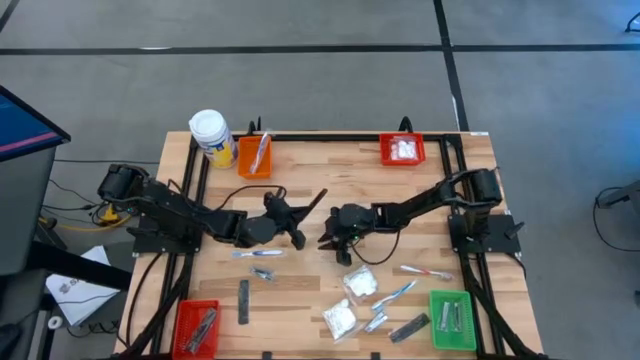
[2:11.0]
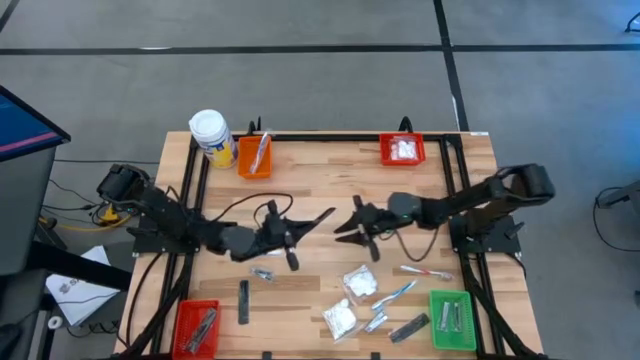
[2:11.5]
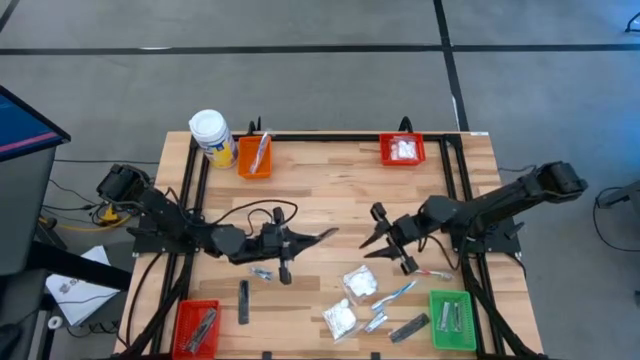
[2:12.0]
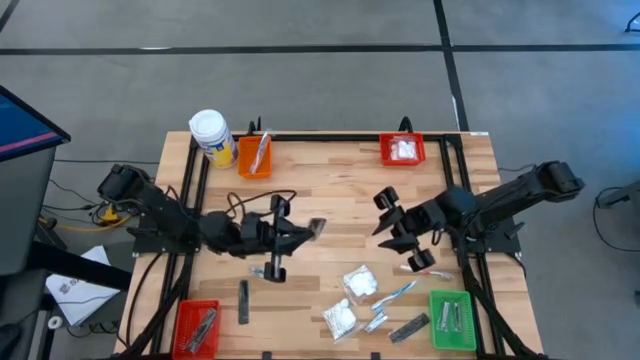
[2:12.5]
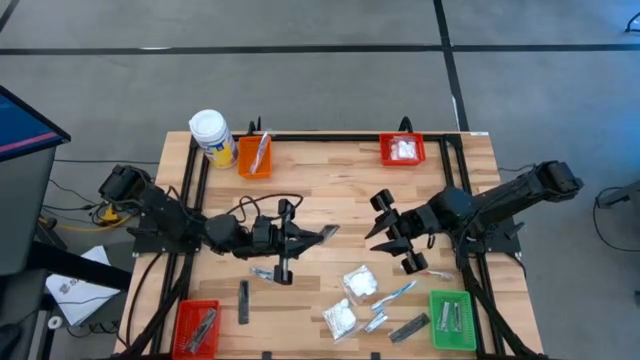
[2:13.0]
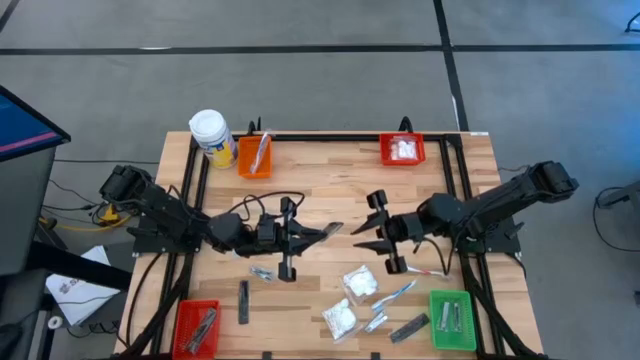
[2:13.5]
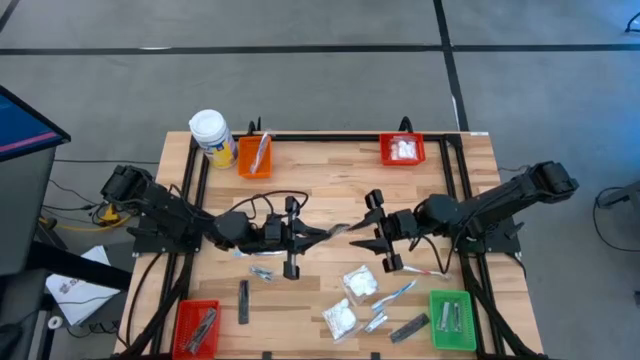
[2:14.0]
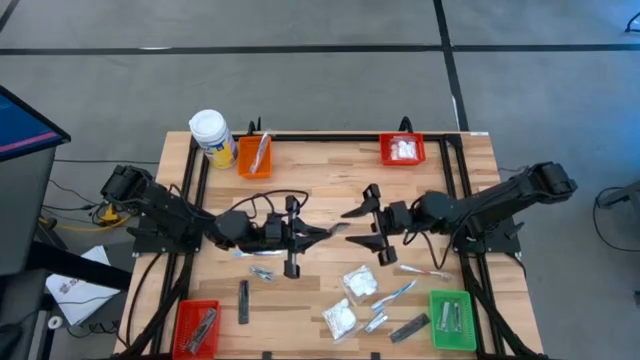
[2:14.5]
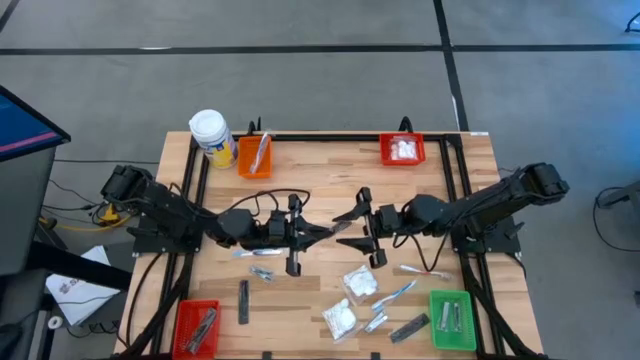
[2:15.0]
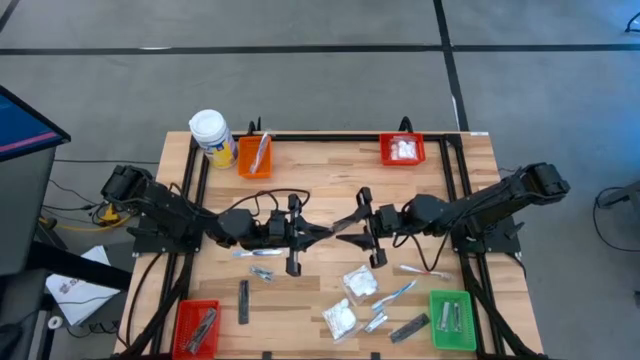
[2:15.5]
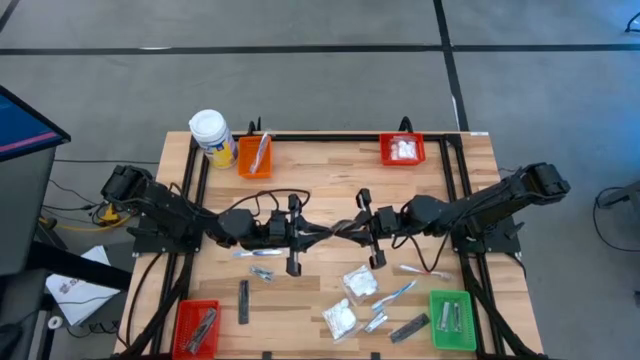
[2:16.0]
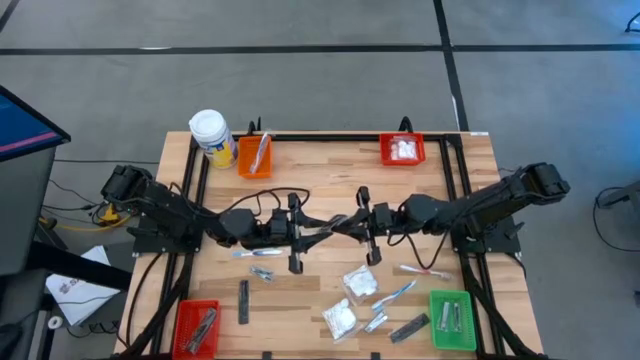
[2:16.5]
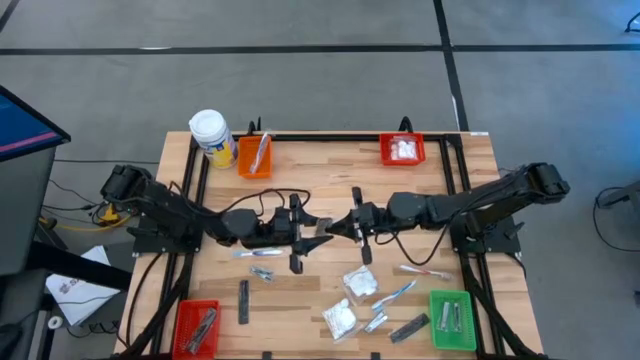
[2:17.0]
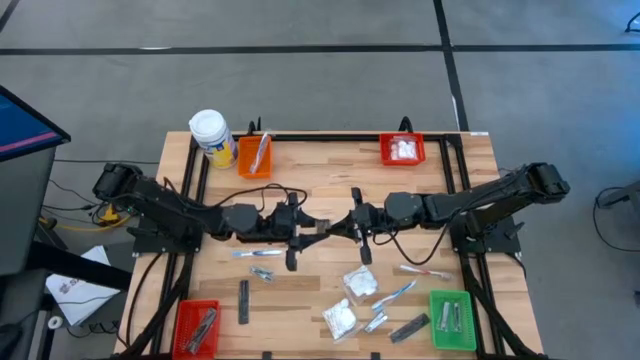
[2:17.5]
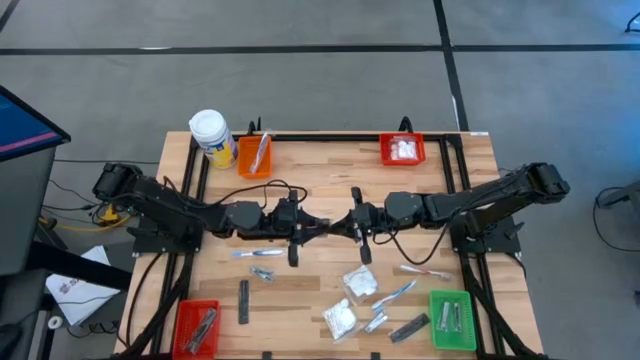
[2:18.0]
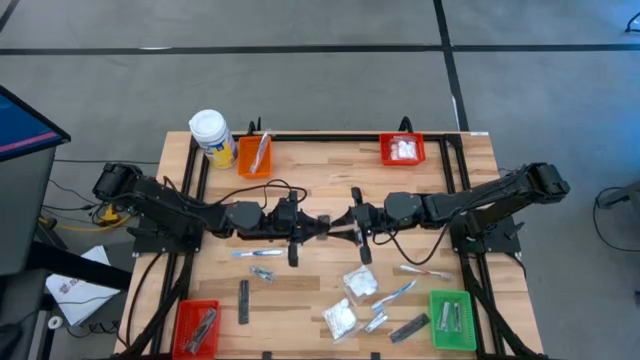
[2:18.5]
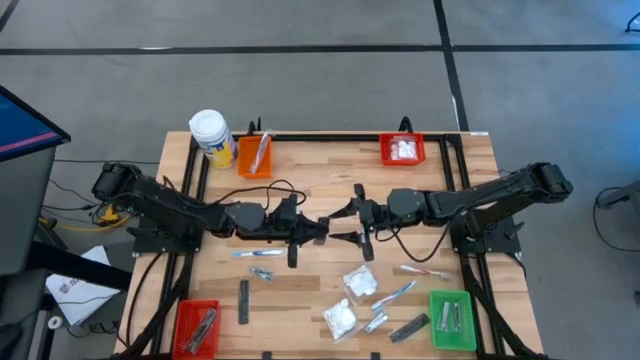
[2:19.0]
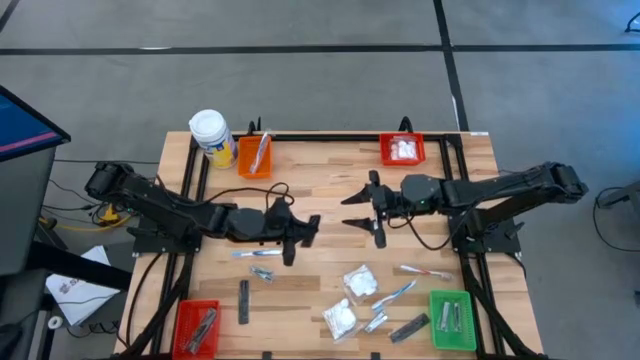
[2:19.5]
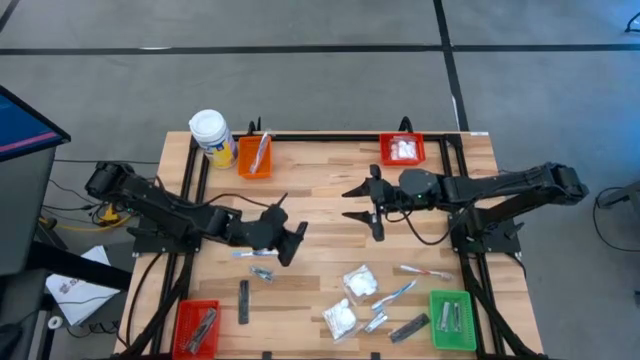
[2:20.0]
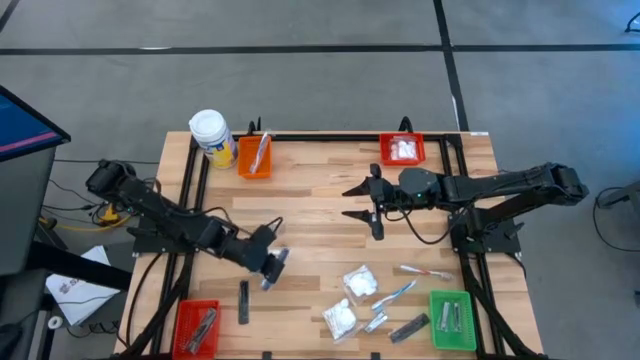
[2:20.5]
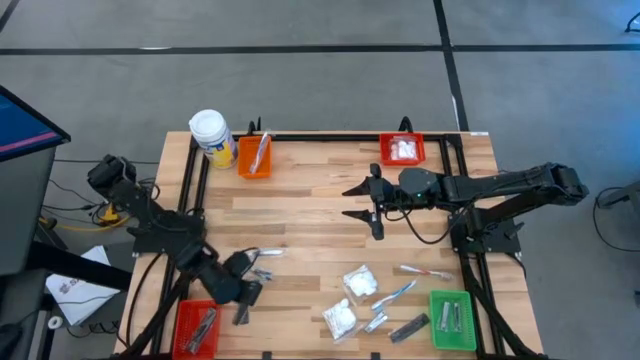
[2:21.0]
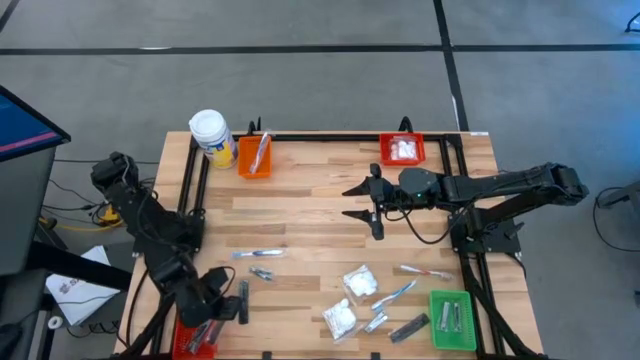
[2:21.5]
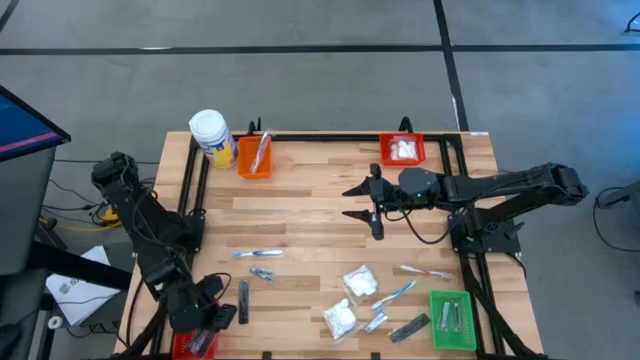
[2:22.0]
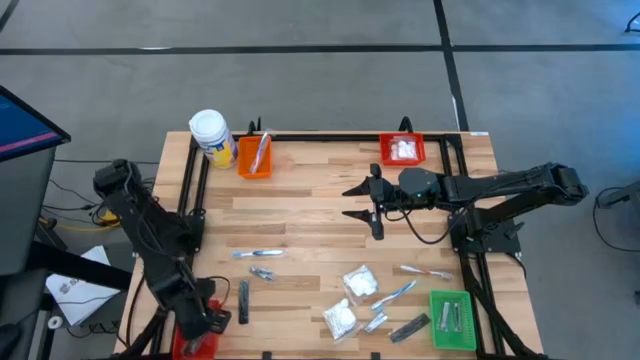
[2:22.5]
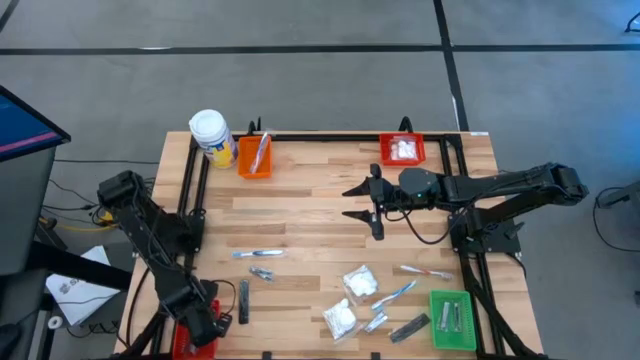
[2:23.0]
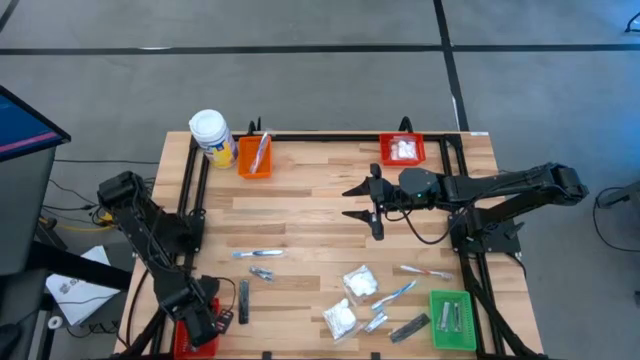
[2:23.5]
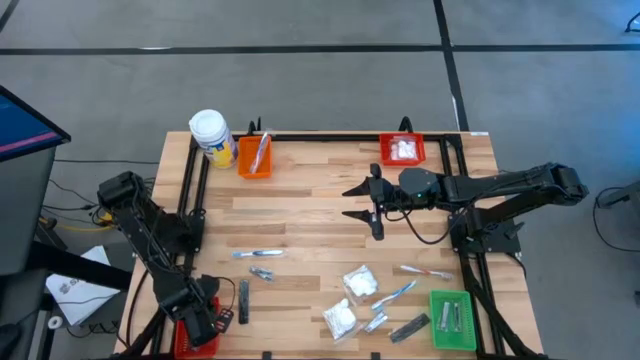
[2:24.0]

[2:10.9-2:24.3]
Task: Pick & Place Travel size toiletries
Put the top comb into the bottom red bin

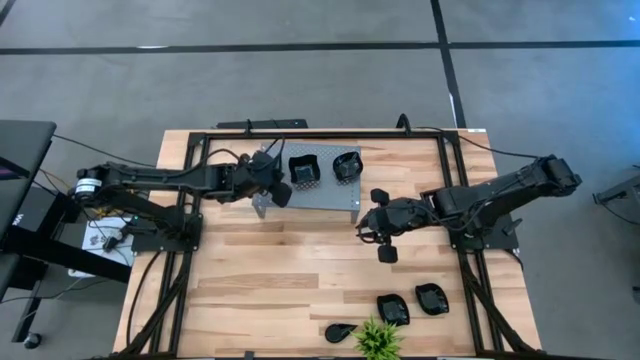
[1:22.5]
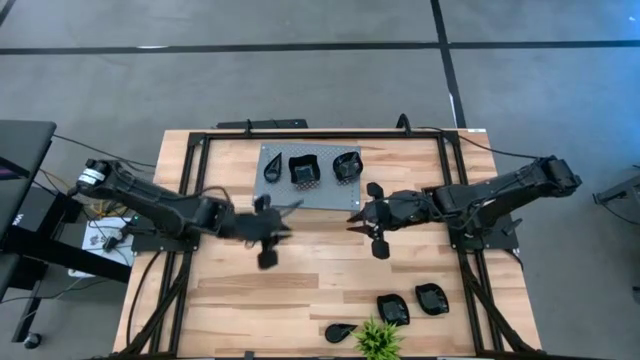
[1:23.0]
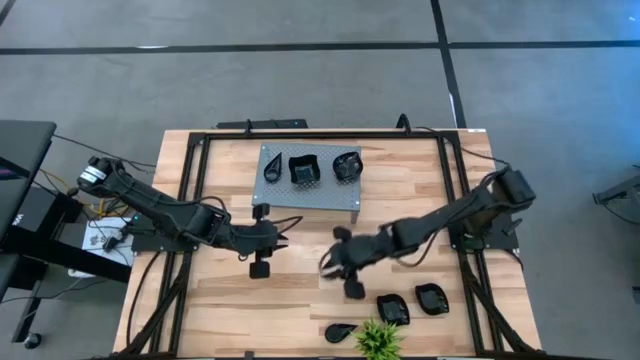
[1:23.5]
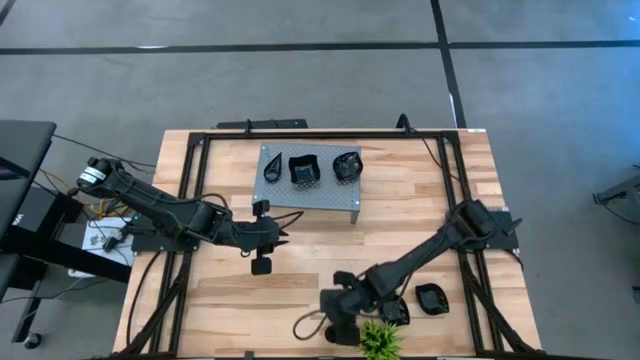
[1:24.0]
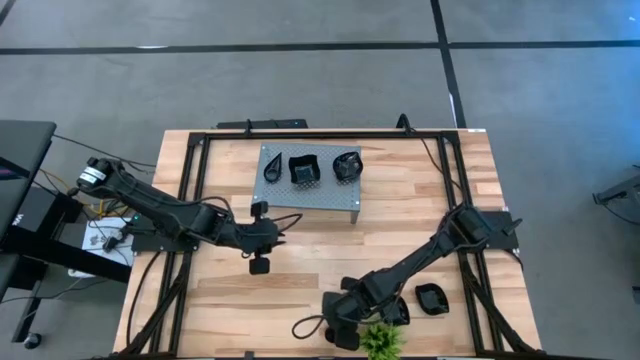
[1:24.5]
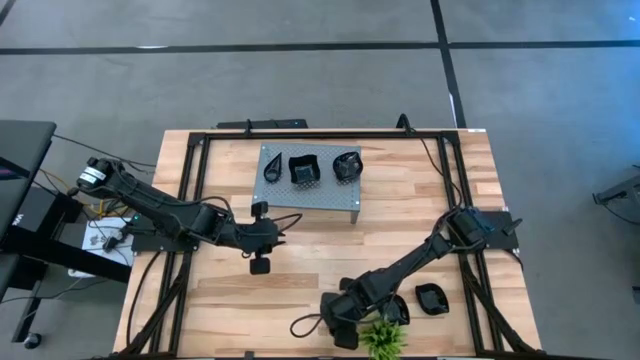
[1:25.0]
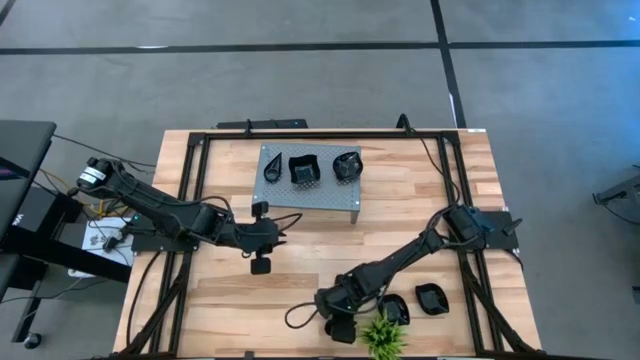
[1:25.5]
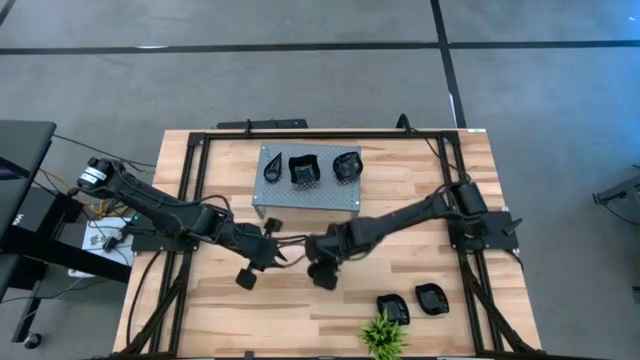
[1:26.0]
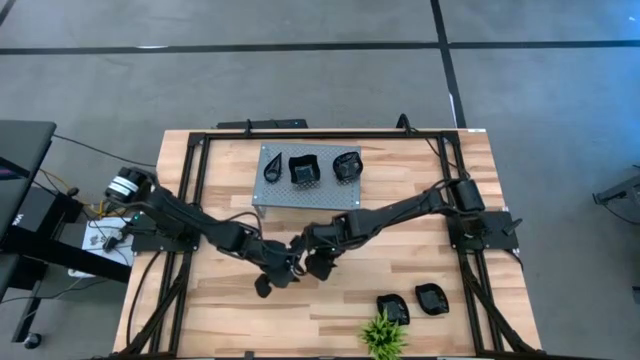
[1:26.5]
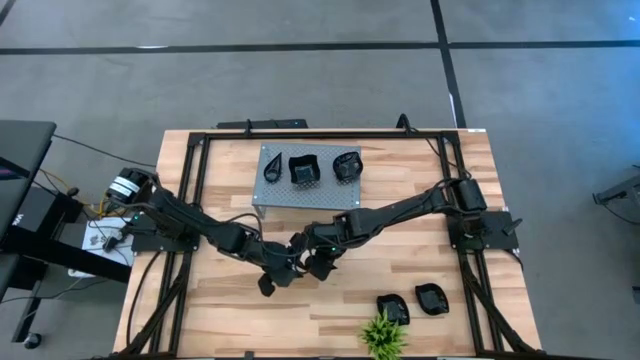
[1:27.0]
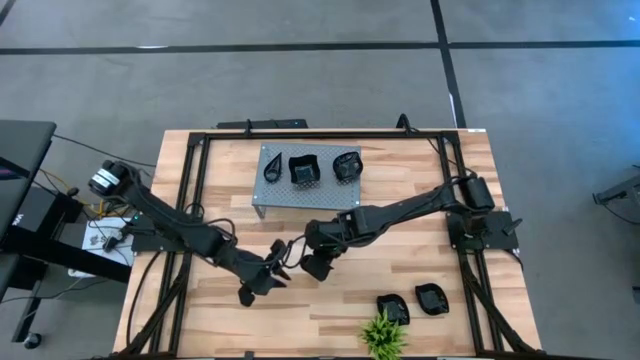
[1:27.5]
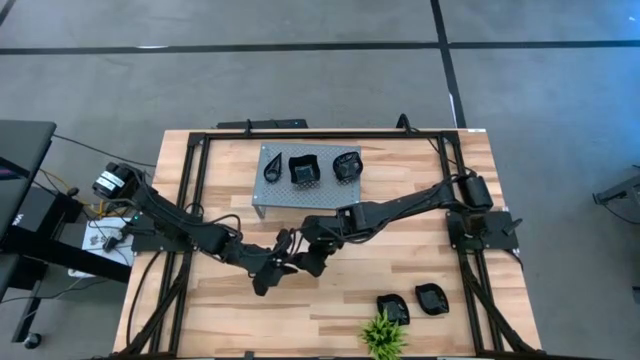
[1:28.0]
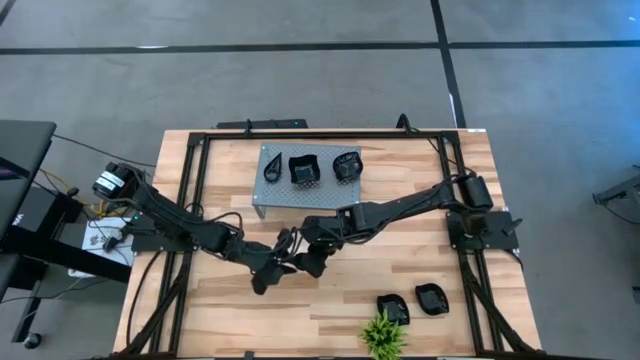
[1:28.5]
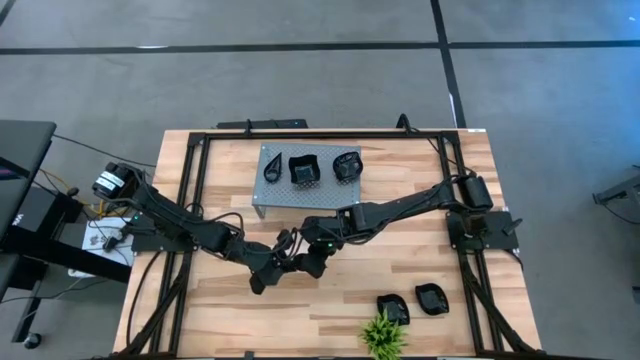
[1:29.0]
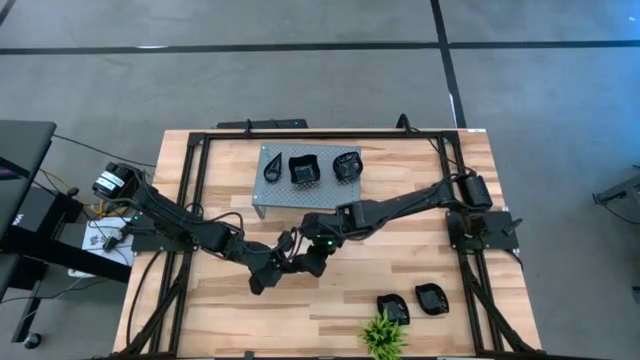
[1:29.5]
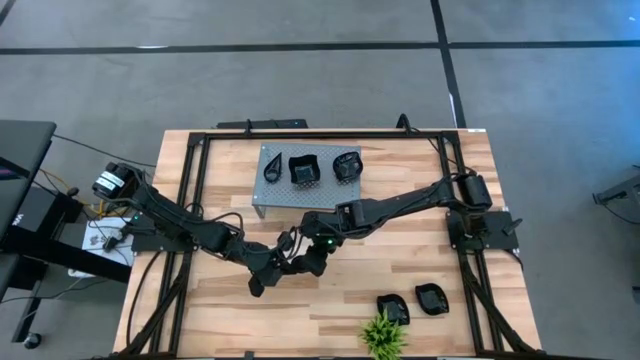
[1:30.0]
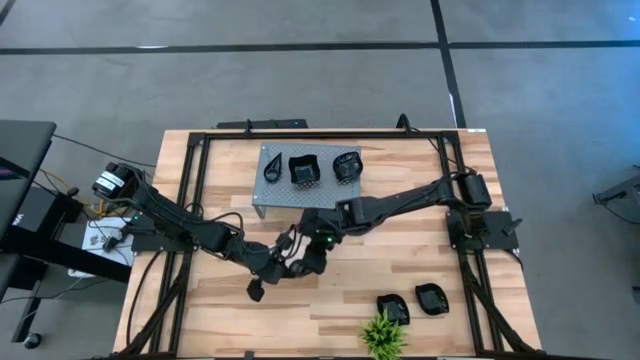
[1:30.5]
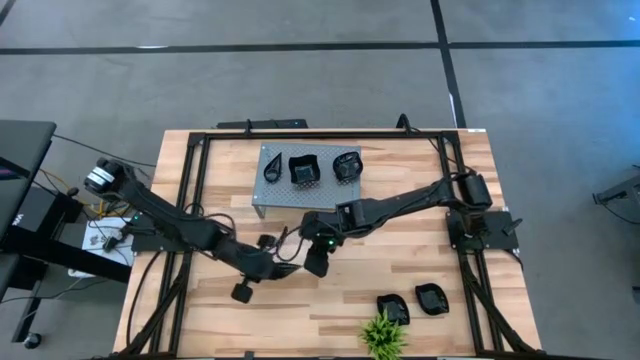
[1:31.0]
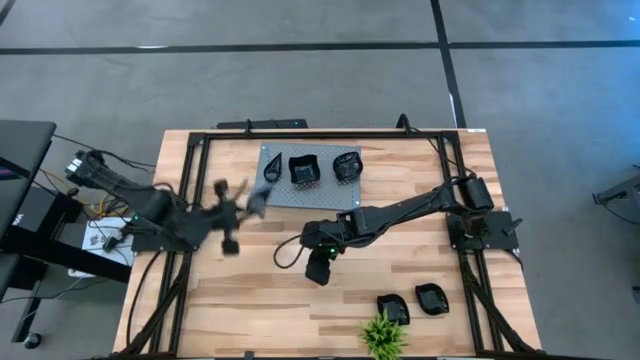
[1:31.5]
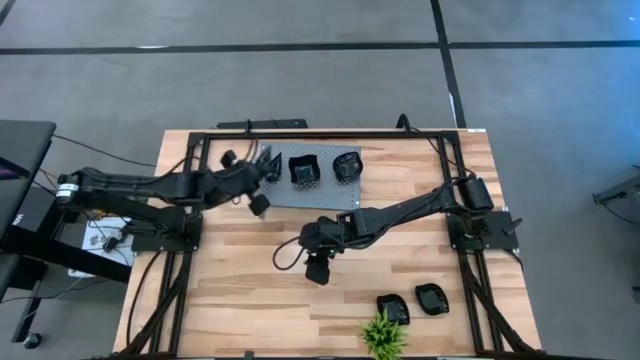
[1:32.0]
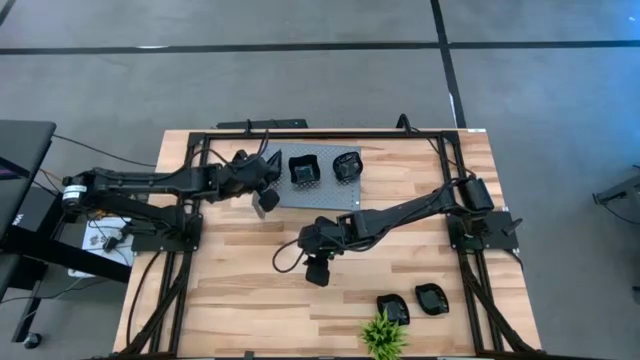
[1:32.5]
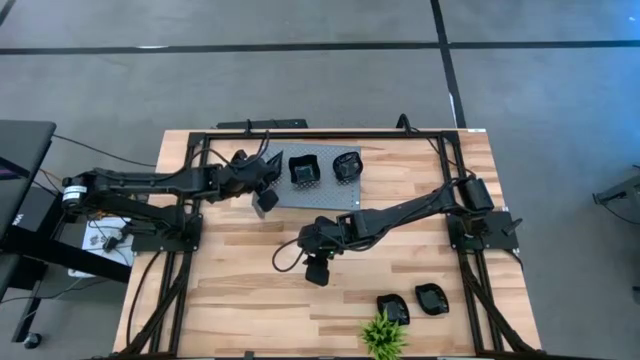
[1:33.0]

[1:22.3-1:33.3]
Task: Pick & Place Mini shaped plates
Stack the black drop-shaped plate on top of the black drop-shaped plate on the shelf
